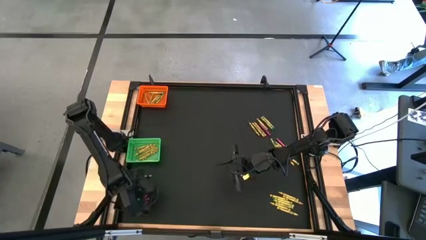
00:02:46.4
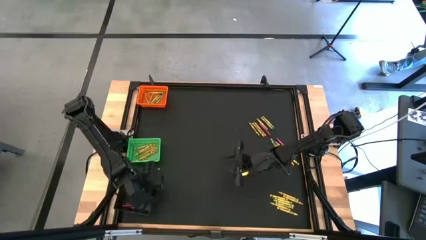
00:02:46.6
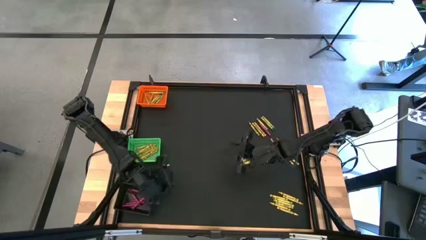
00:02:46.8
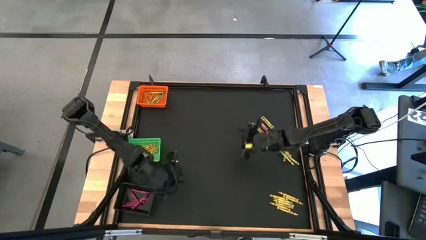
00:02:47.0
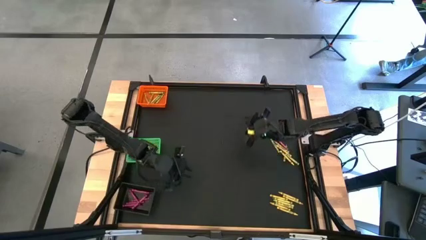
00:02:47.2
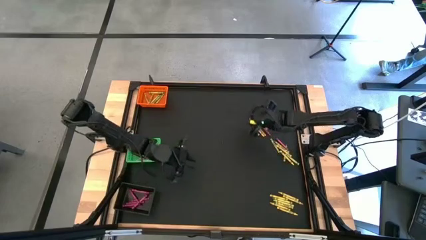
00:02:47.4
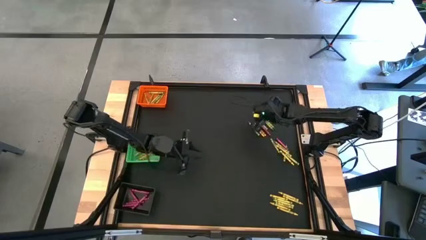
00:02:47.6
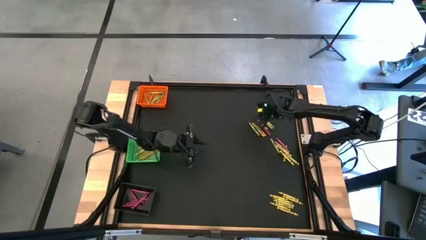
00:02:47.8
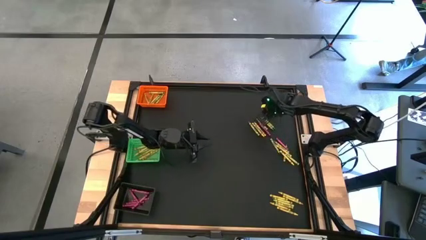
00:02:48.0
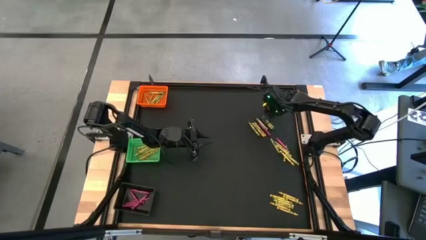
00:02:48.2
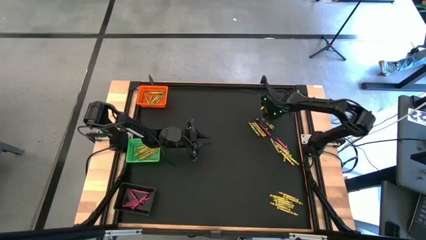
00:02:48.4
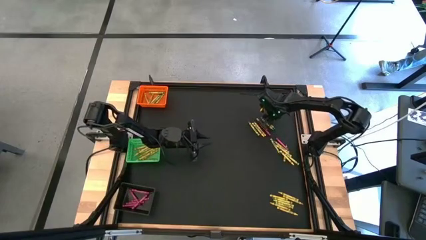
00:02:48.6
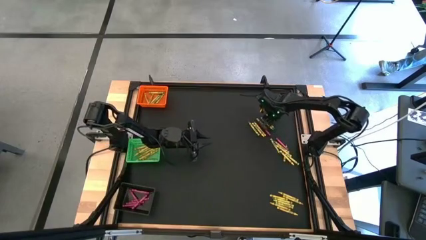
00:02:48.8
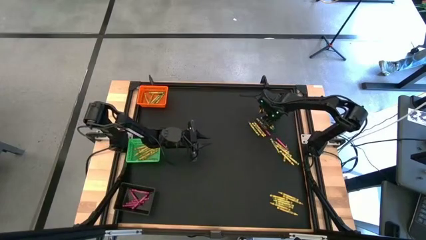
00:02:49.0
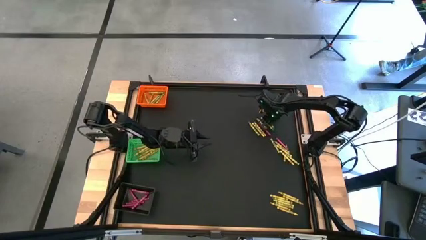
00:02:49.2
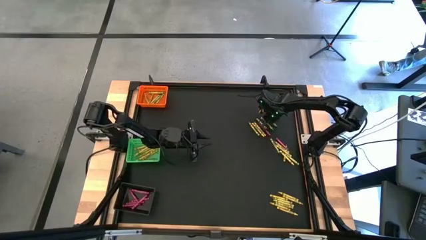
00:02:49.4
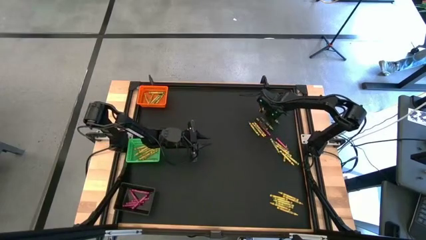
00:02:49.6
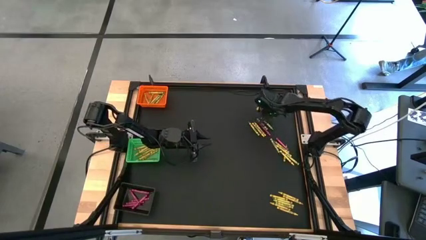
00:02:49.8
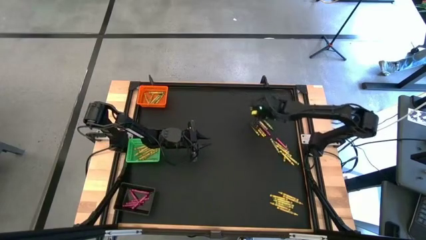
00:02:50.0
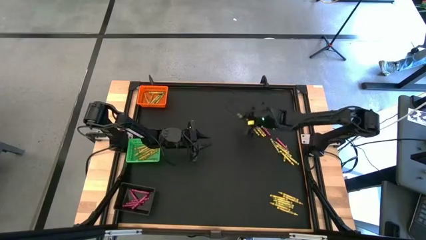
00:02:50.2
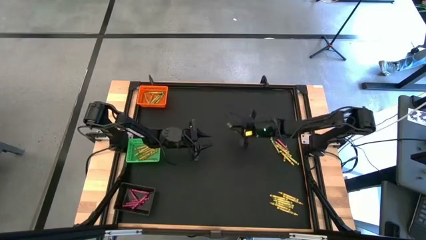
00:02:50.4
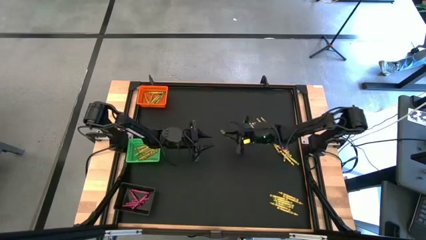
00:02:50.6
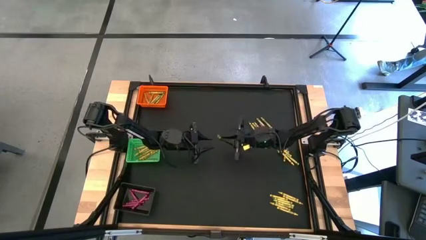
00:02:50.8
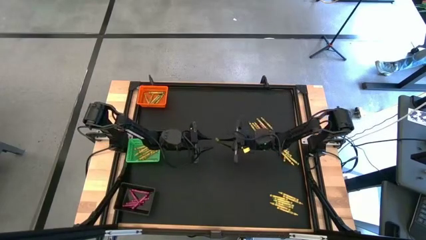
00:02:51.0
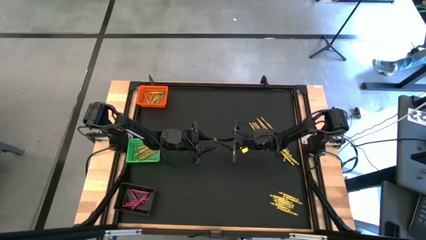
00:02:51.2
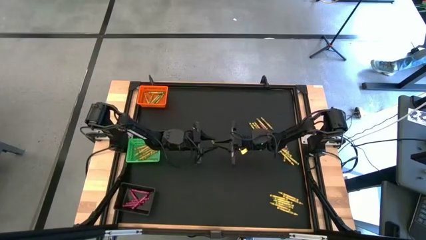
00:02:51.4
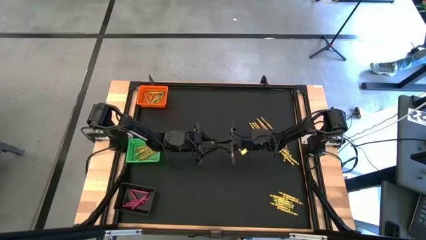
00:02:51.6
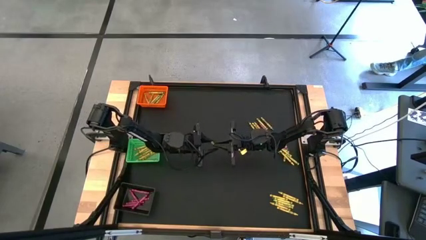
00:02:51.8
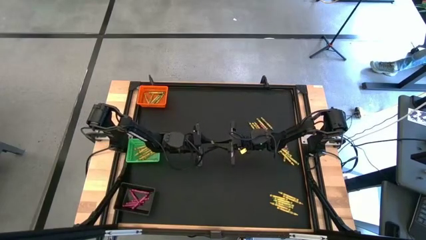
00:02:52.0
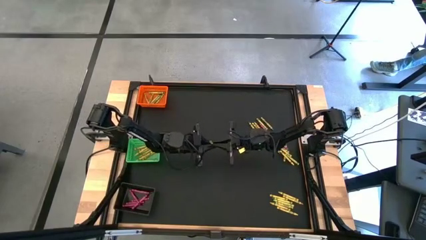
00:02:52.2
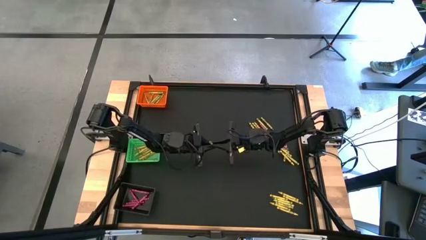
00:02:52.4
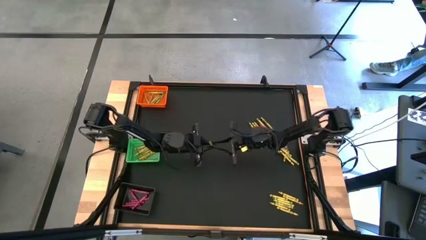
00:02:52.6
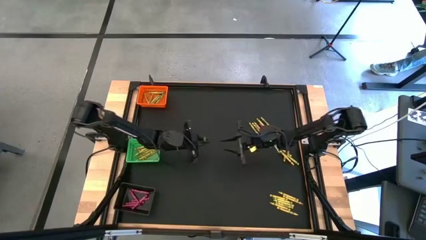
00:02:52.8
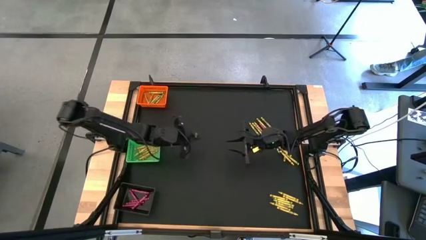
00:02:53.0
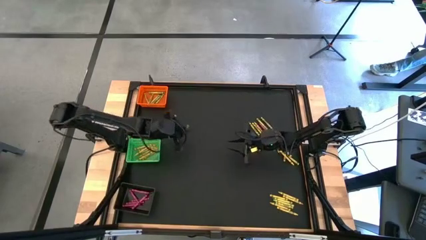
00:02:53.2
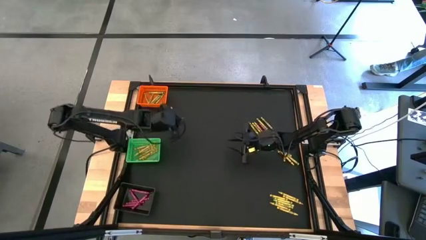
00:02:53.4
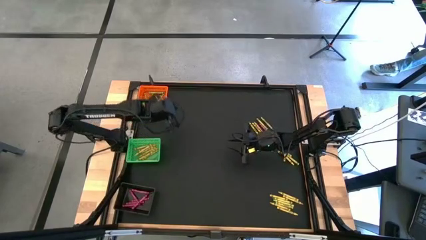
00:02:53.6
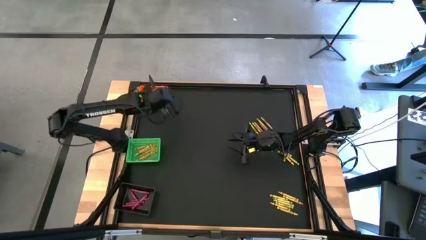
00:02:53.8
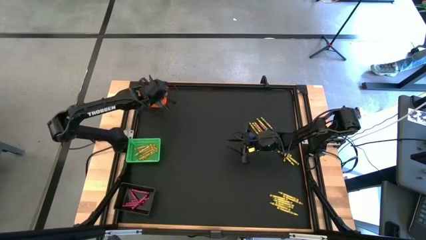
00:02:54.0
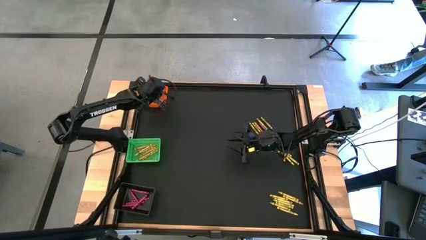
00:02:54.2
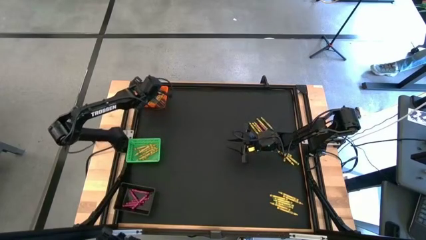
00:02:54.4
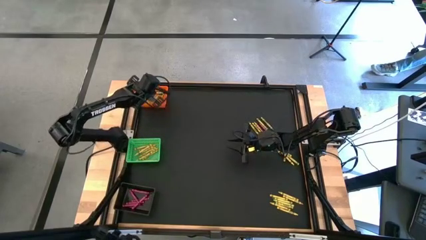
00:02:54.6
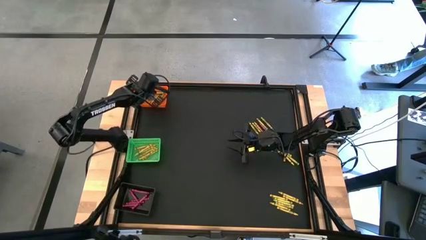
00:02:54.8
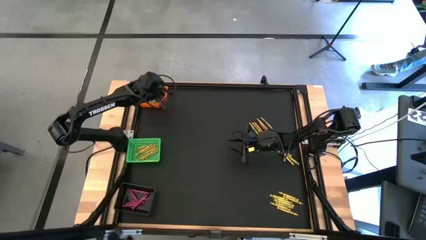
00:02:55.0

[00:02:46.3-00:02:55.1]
Task: Sort crayons
Put the green crayon into the orange bin

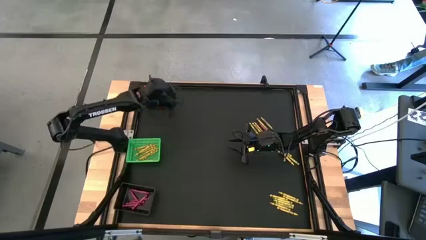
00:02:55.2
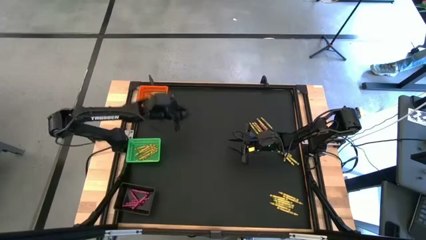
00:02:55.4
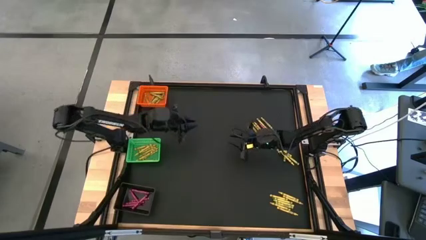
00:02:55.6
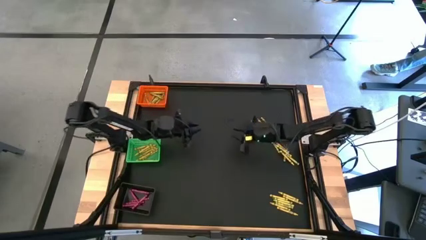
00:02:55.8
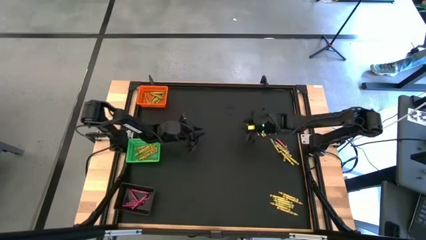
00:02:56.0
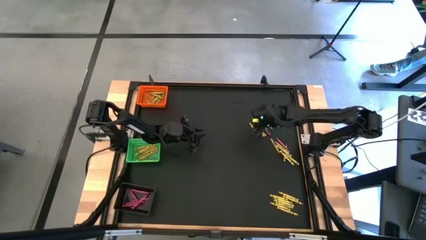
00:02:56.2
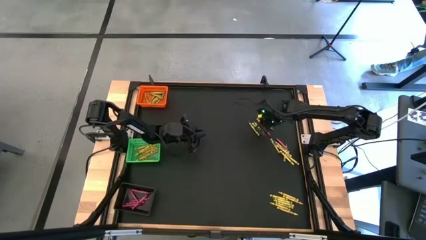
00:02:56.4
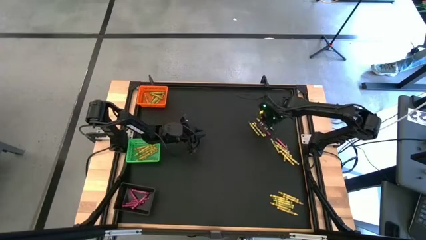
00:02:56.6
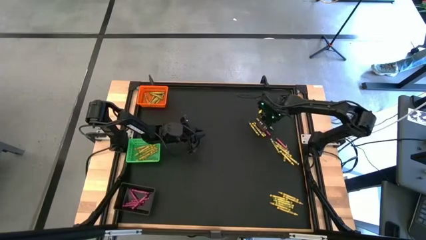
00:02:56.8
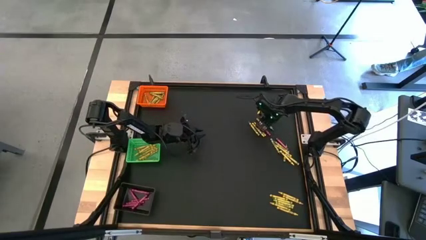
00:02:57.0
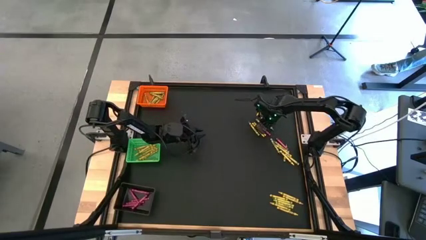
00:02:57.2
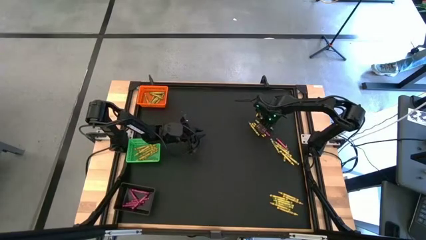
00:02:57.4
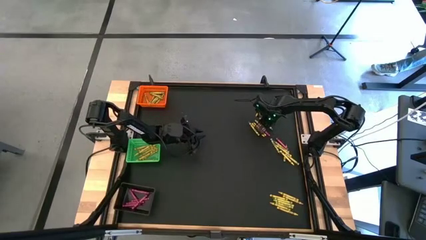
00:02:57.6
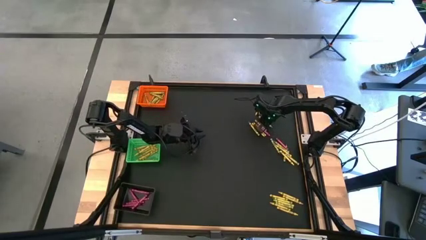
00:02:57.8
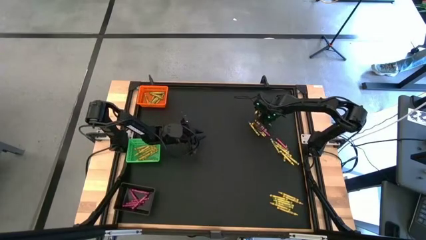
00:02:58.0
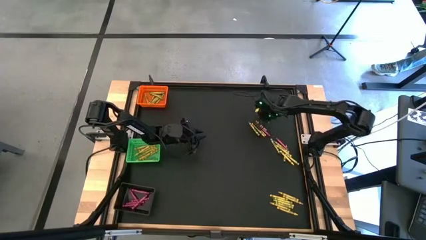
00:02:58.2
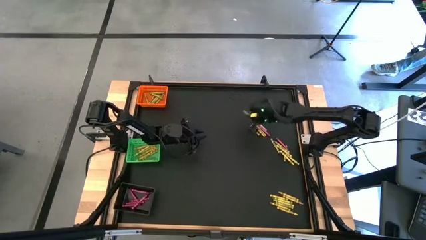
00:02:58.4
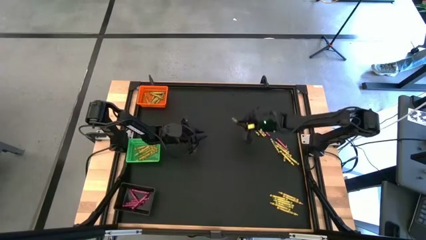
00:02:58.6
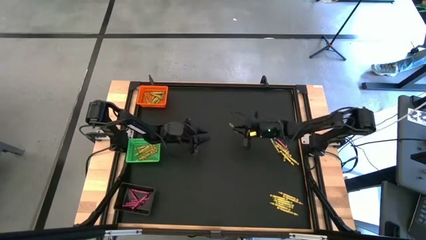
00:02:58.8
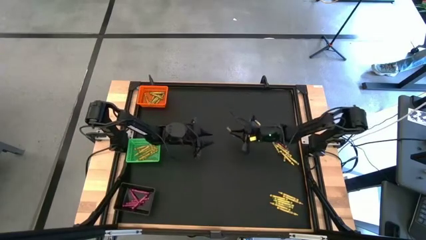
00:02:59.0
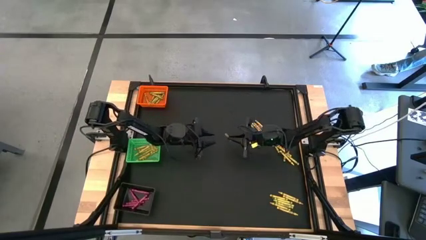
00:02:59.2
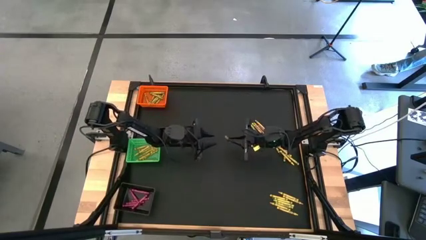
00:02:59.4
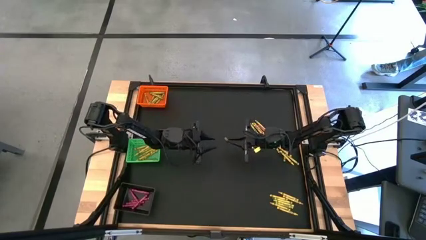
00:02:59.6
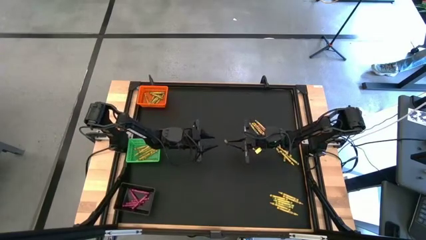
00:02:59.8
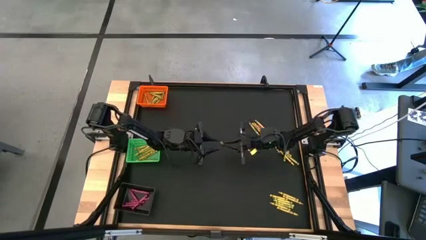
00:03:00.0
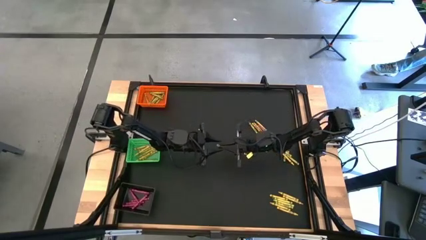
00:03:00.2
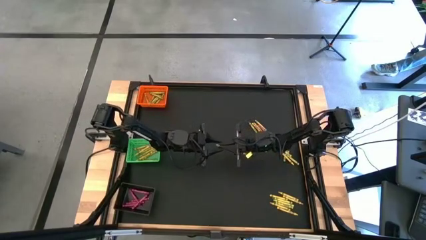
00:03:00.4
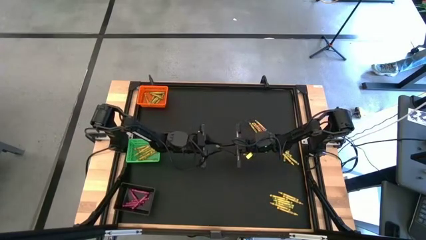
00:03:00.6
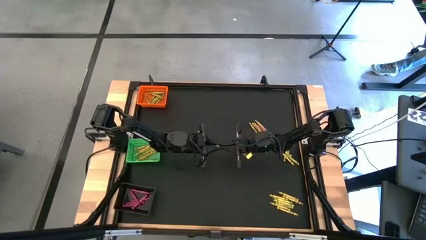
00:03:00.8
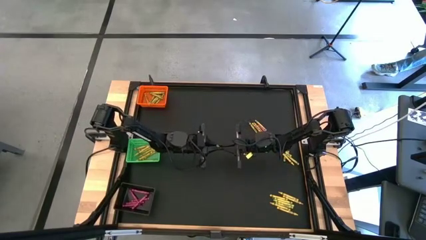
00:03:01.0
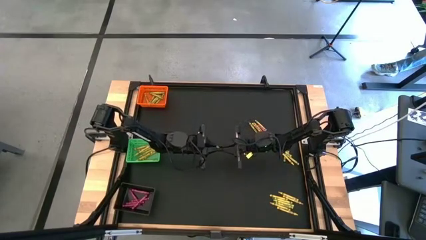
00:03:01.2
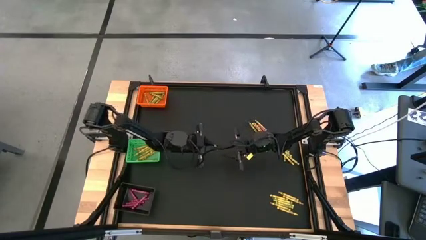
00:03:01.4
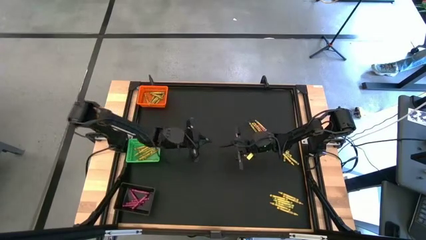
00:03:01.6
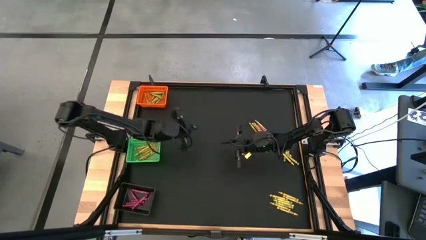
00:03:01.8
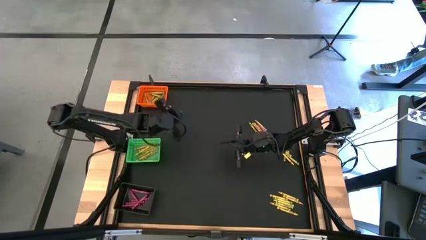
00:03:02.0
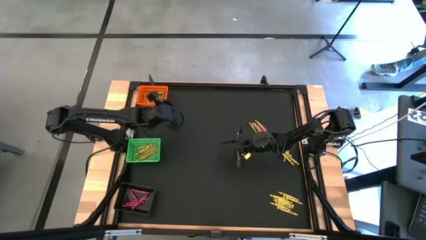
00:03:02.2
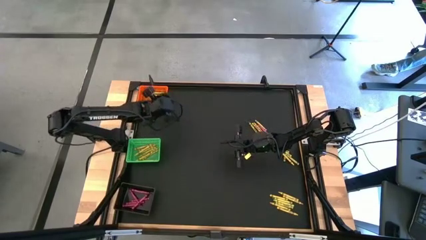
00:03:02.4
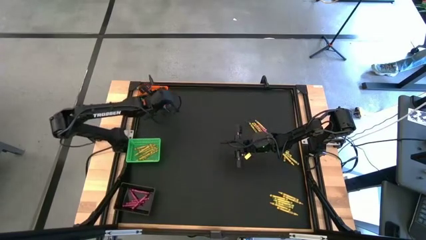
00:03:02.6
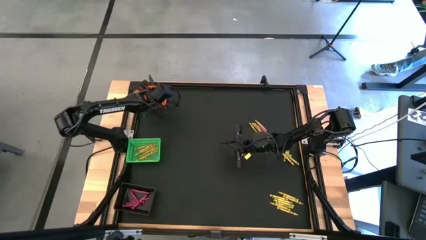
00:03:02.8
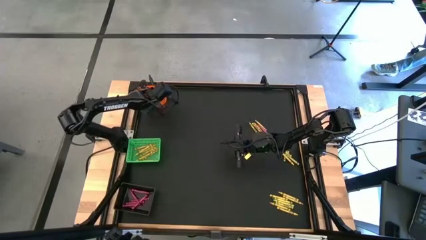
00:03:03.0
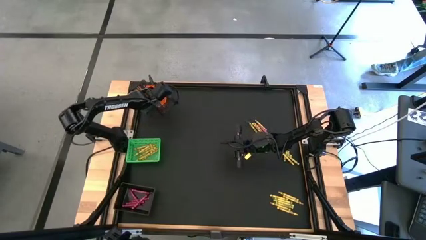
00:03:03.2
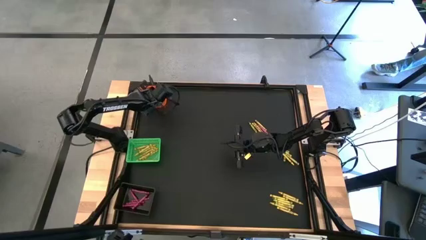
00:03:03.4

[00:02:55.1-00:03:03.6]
Put the green crayon into the orange bin
